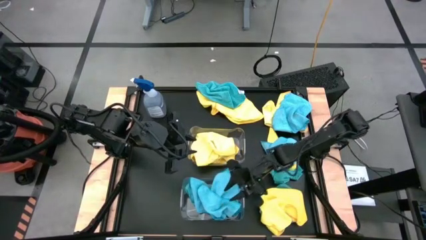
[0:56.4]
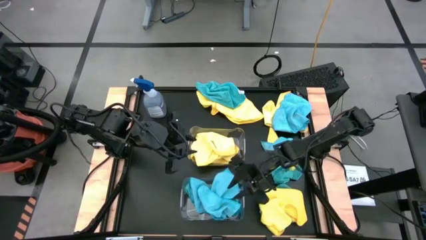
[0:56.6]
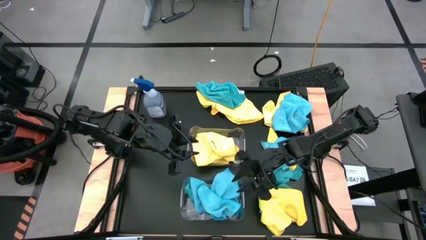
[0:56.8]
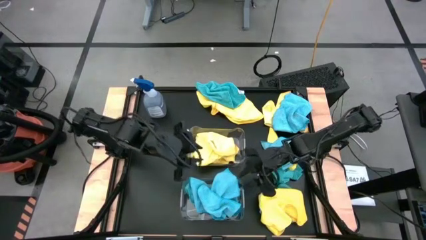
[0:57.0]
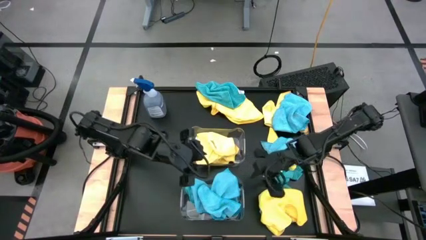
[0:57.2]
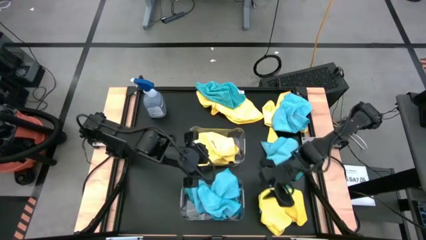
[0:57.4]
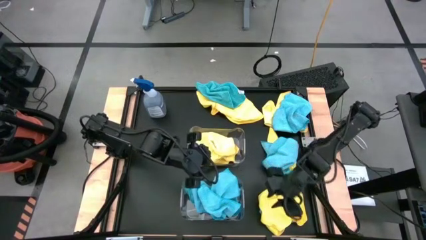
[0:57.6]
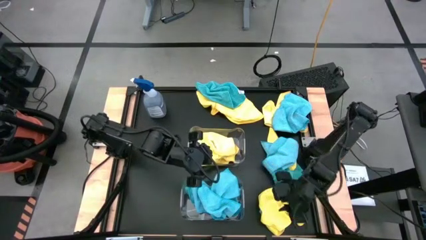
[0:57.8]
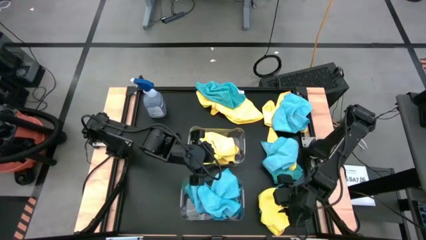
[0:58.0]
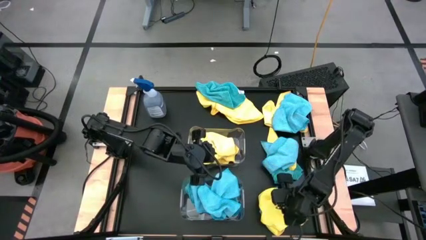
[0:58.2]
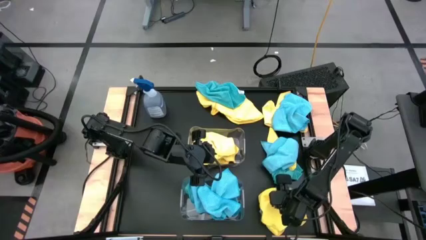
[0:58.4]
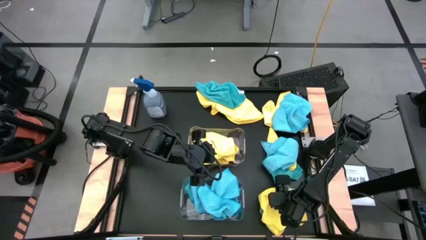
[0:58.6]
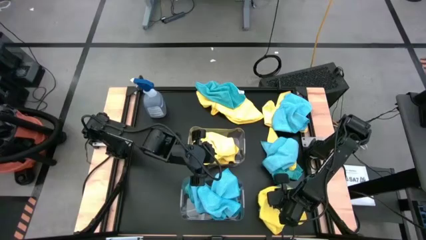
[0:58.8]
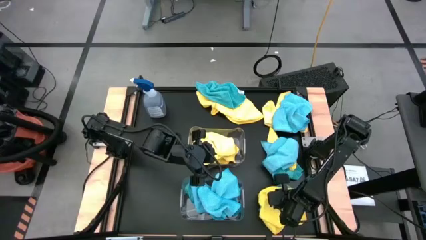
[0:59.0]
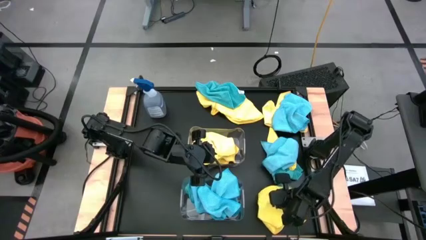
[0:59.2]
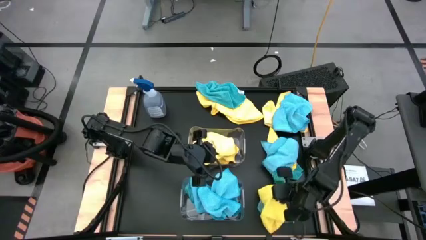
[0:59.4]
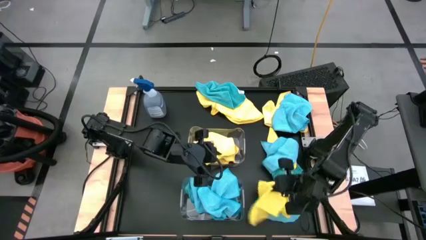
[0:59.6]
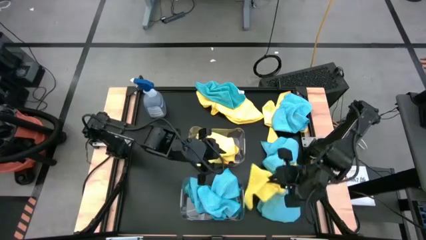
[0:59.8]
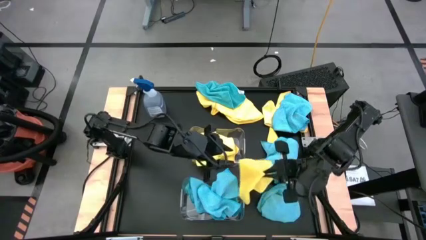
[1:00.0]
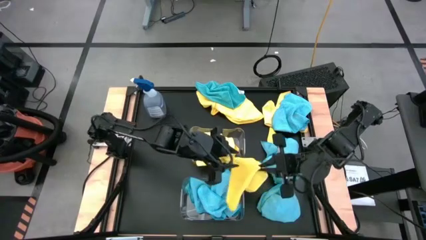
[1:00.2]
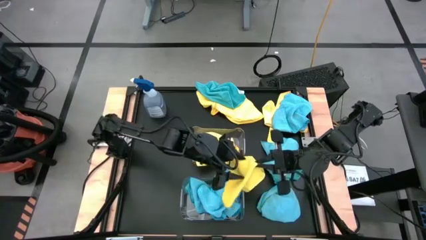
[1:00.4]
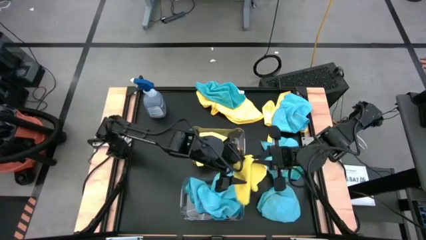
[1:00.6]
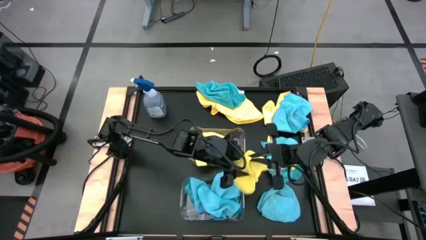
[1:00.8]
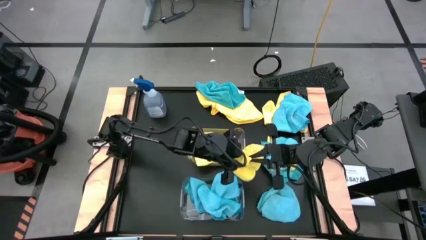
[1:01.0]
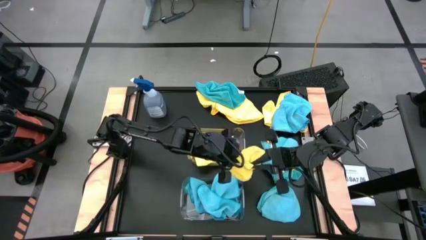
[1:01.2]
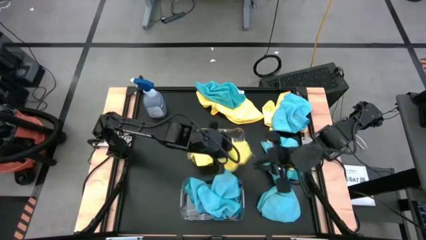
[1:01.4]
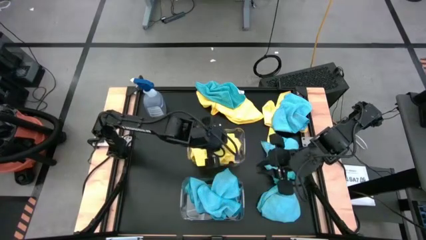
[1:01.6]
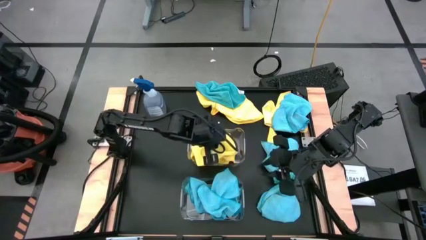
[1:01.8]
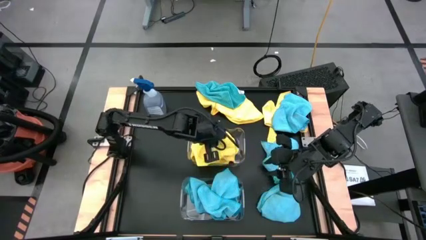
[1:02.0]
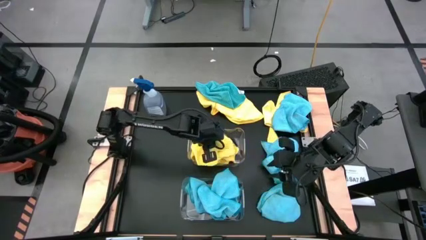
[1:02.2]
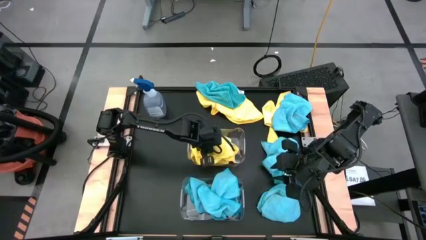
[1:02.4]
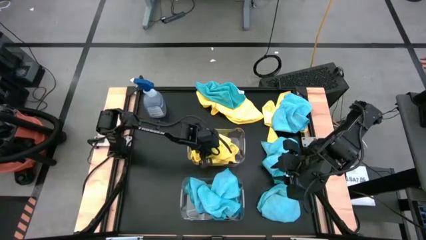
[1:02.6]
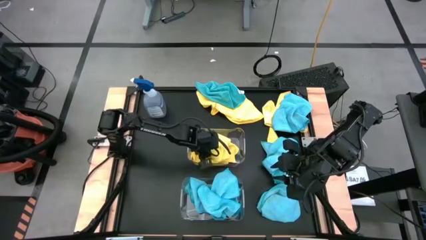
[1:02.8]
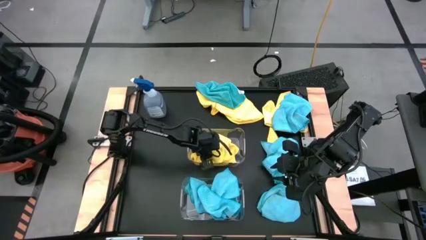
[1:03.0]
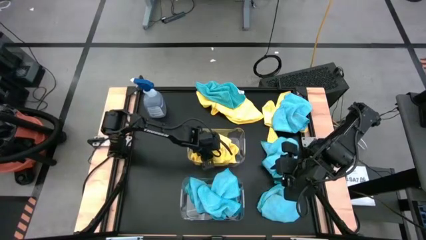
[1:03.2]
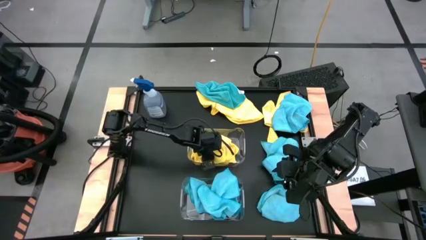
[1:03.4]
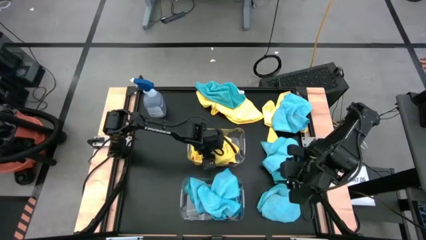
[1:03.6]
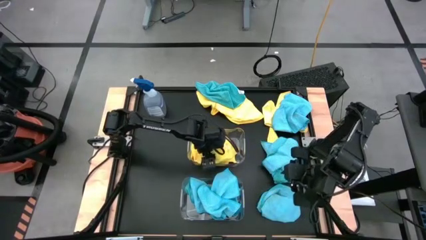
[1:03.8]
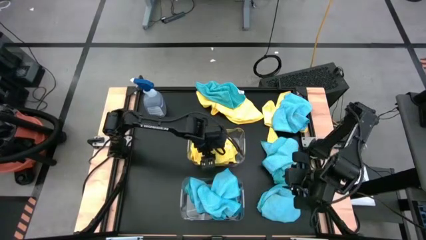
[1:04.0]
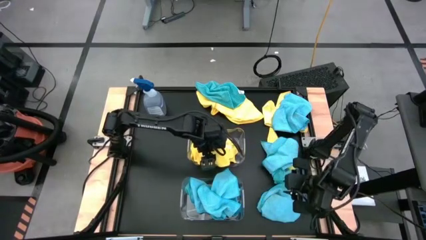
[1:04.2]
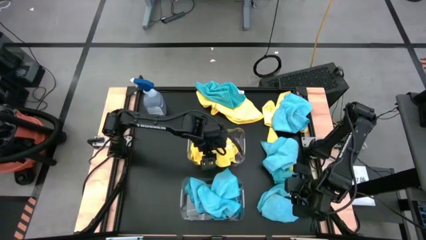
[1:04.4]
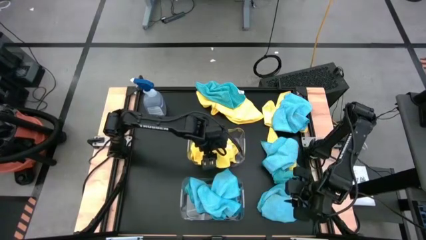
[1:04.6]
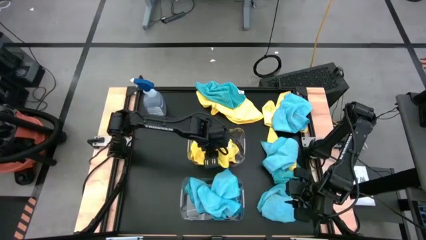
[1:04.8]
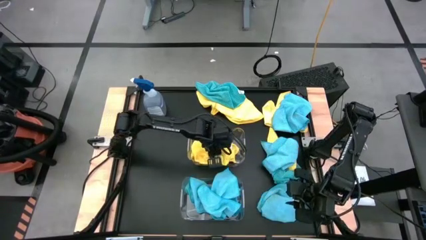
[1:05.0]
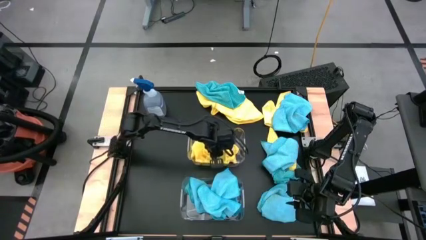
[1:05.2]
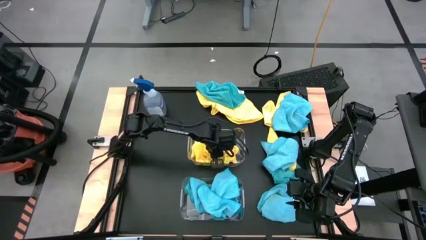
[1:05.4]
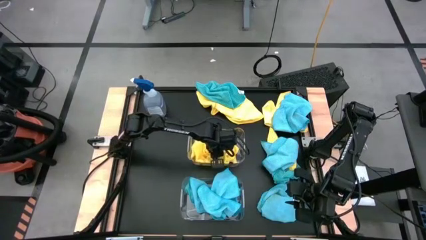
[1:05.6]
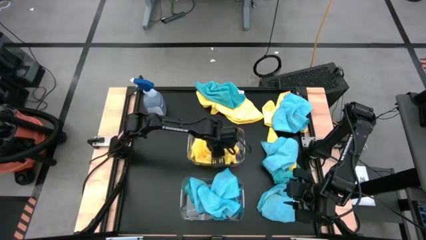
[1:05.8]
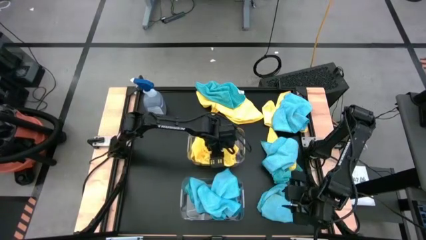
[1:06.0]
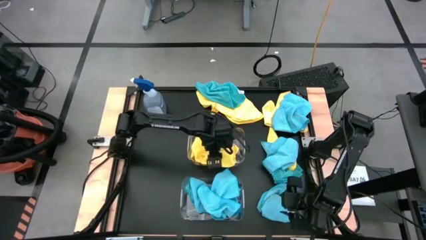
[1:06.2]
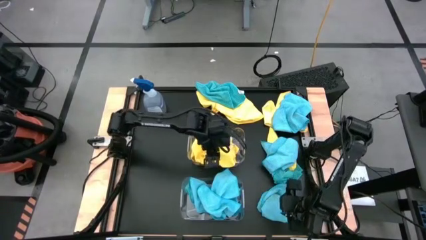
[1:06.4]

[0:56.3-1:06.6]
Task: Sort microfiber towel by color & place in baskets
Put the yellow microfiber cloth into the top transparent bin

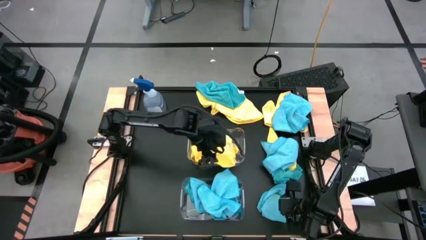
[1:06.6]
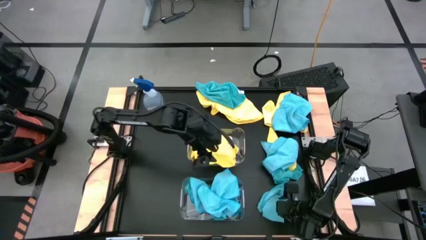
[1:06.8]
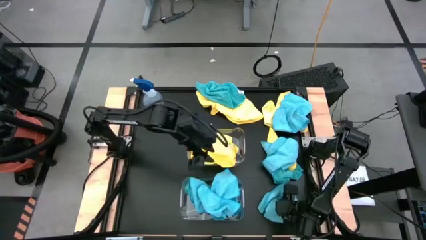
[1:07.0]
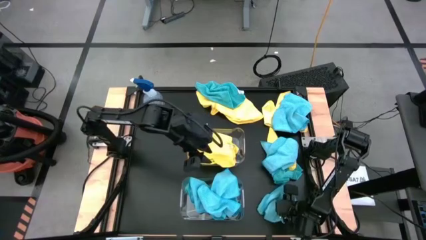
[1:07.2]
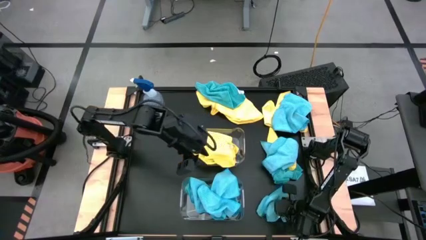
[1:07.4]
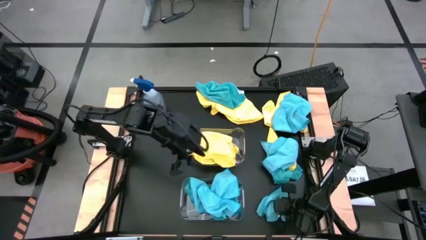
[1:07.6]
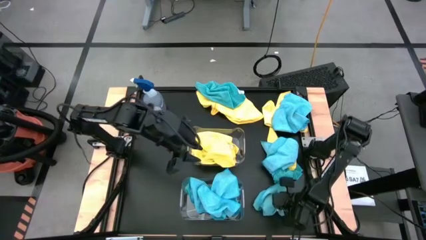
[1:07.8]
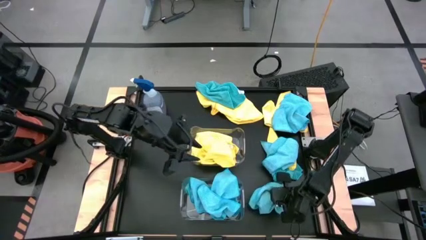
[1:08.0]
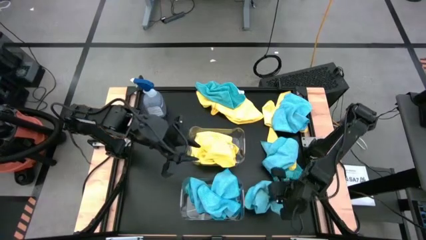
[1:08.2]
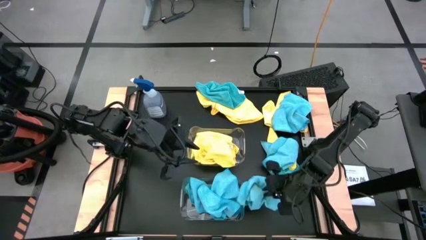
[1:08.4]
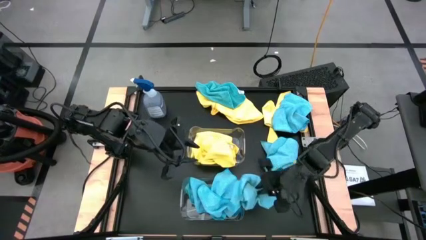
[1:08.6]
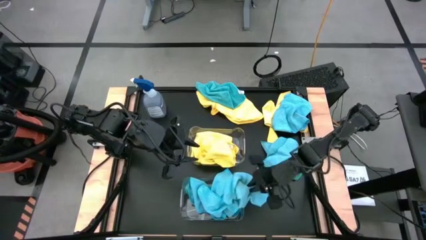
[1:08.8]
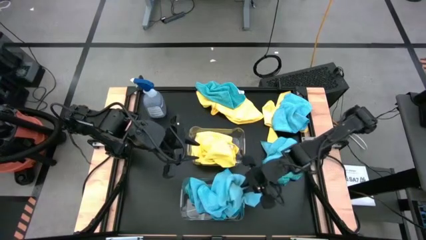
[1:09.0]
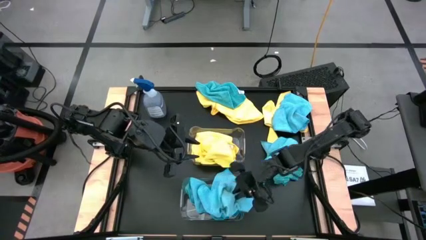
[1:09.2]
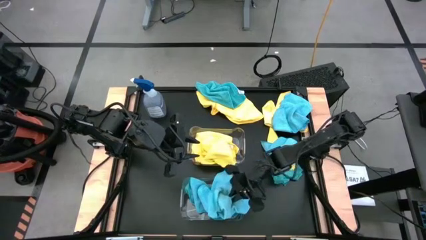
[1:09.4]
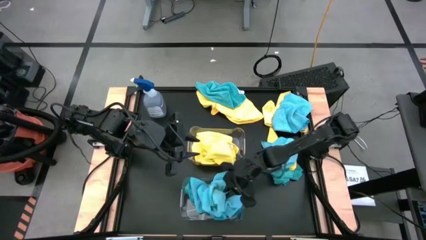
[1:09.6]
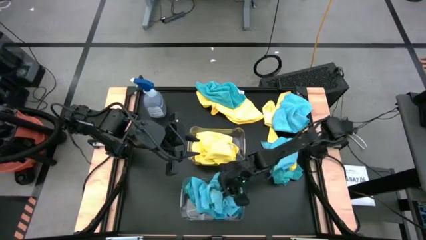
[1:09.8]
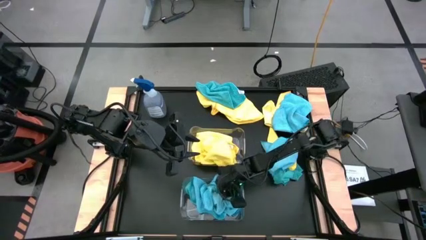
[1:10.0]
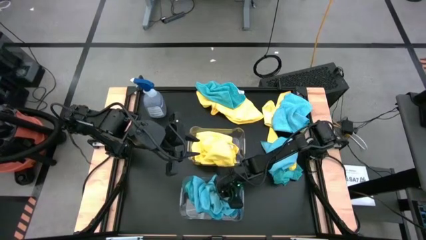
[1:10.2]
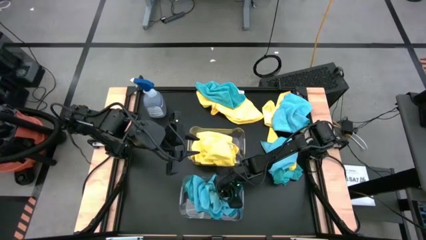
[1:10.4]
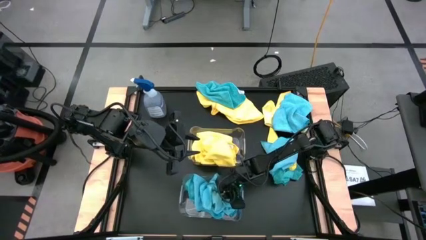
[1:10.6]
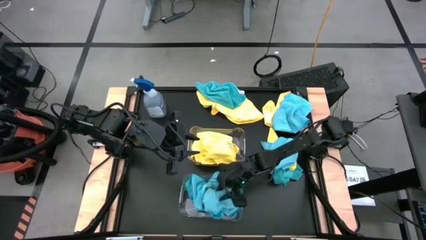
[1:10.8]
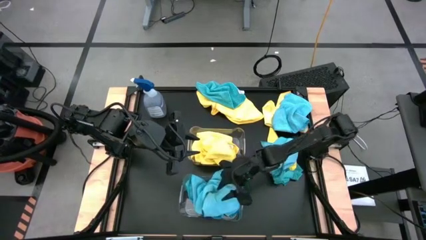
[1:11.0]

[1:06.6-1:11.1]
Put the blue microfiber cloth into the bottom transparent bin

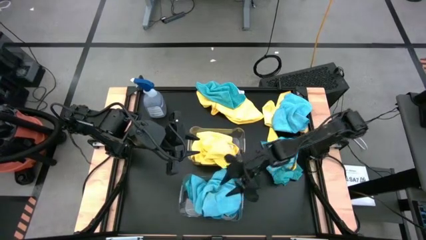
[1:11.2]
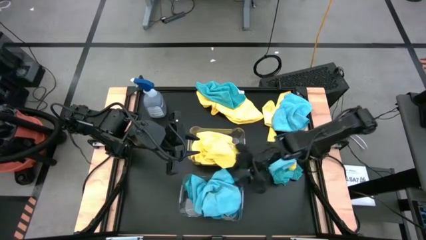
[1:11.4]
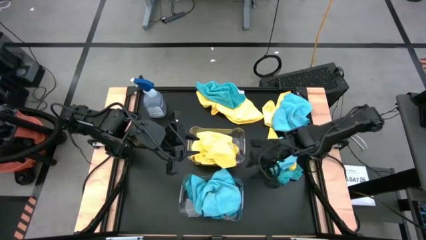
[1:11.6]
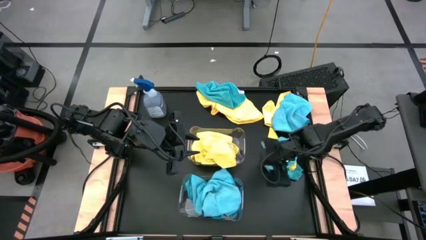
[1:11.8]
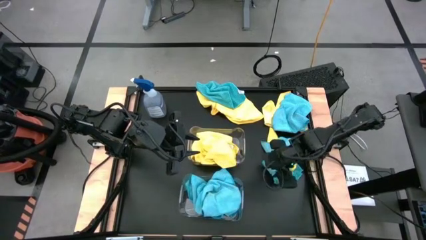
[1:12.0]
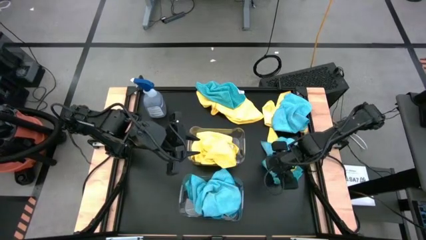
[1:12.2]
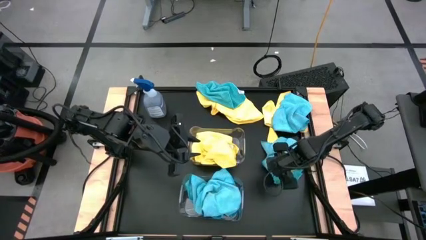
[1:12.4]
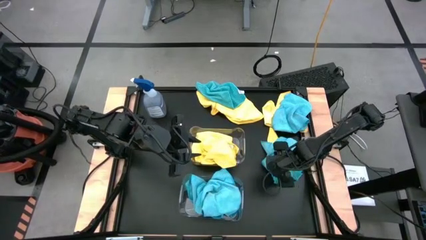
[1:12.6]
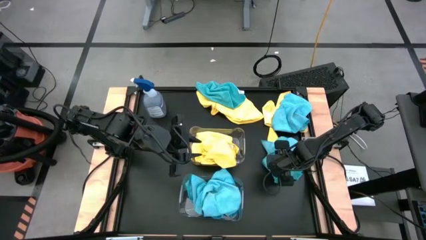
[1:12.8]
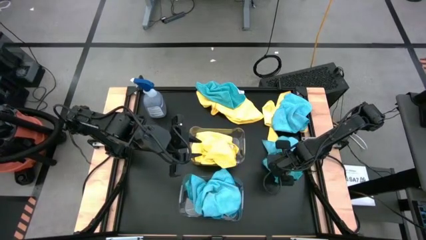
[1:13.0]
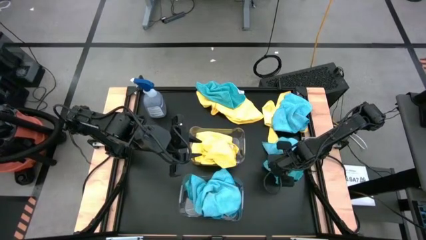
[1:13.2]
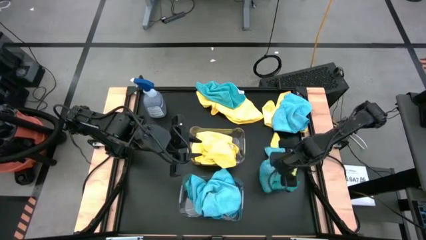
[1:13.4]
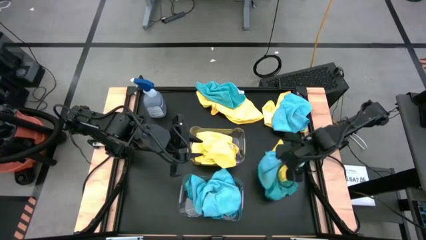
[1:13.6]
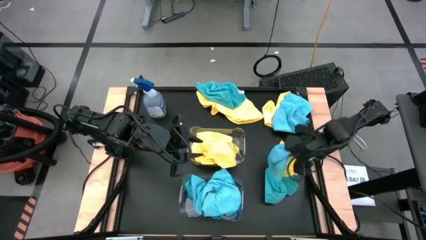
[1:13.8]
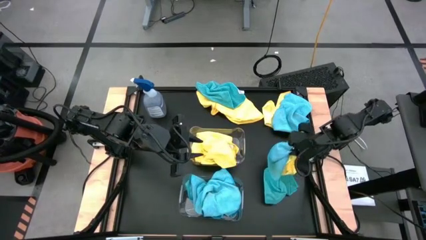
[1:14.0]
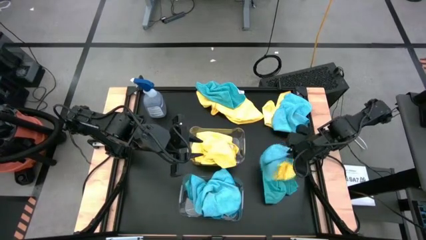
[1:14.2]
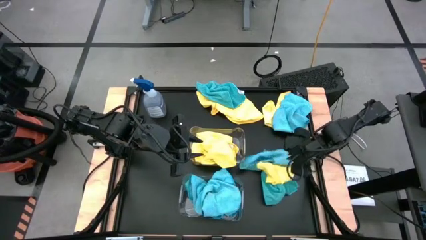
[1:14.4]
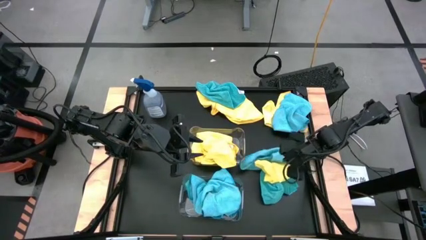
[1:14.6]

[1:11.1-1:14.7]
Put the blue microfiber cloth into the bottom transparent bin
